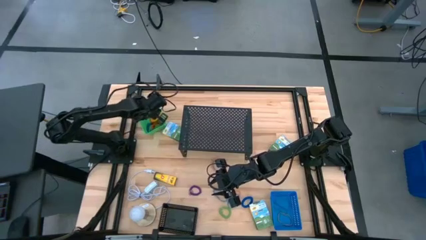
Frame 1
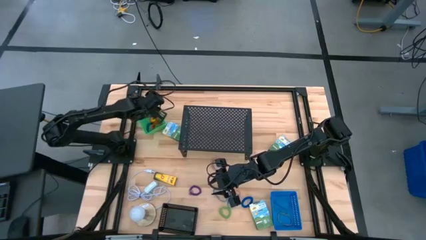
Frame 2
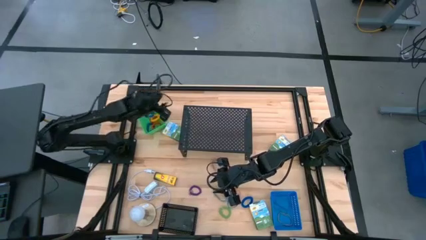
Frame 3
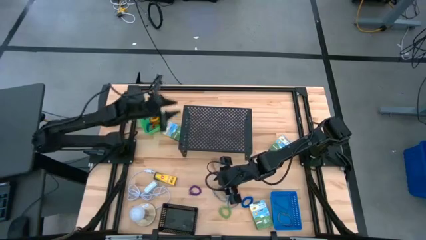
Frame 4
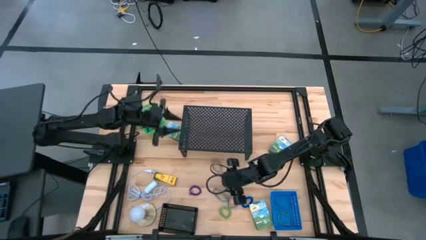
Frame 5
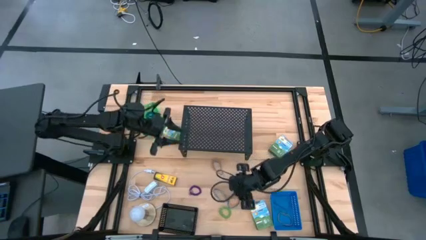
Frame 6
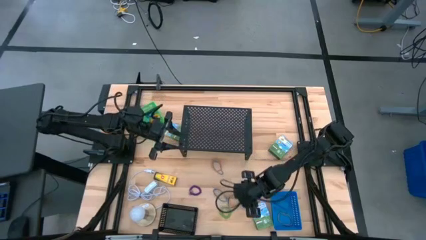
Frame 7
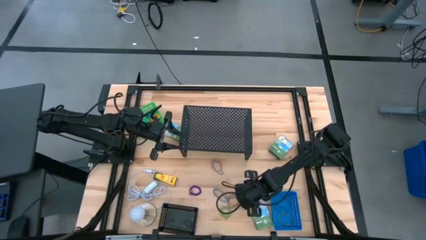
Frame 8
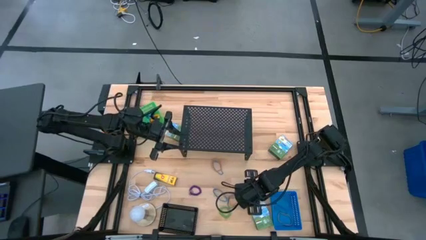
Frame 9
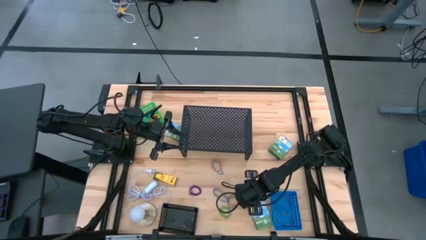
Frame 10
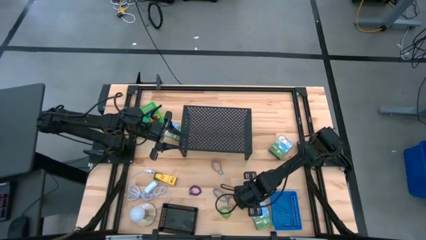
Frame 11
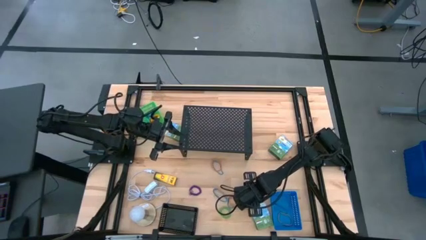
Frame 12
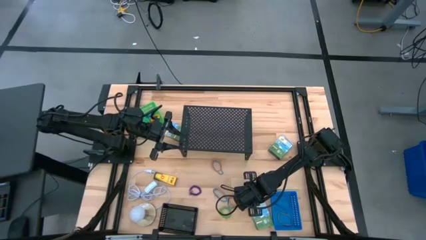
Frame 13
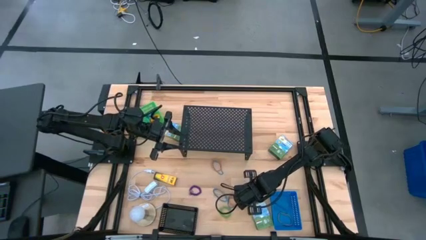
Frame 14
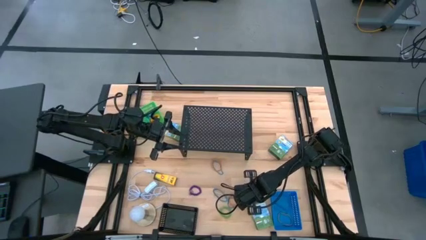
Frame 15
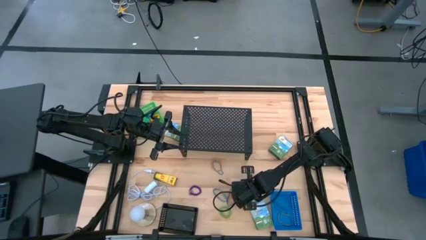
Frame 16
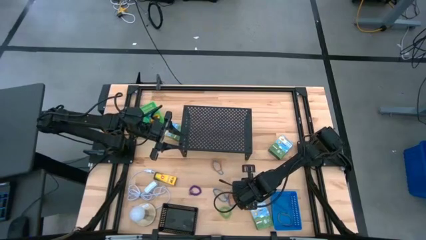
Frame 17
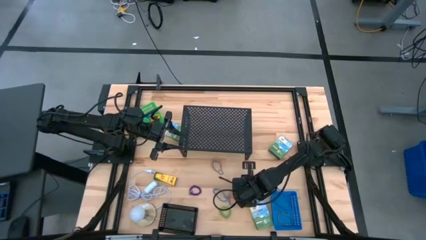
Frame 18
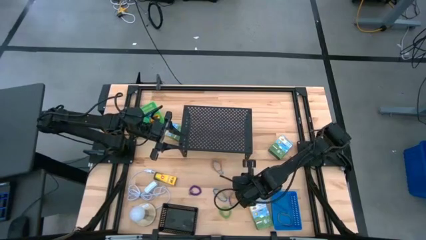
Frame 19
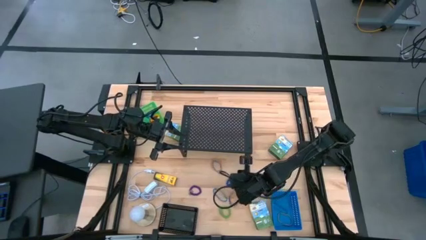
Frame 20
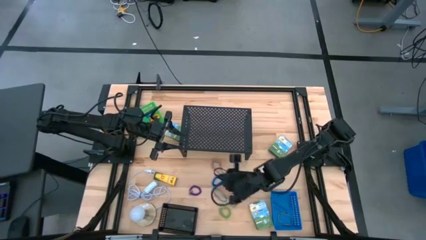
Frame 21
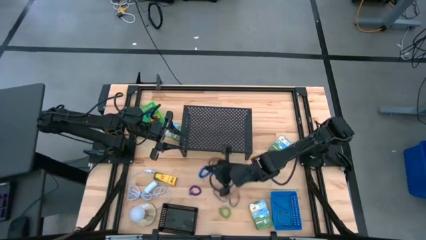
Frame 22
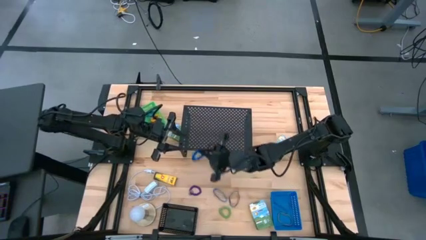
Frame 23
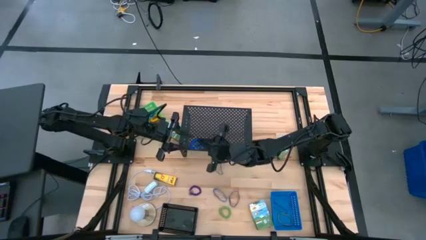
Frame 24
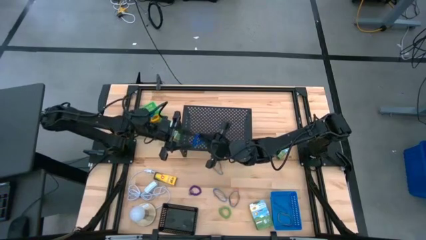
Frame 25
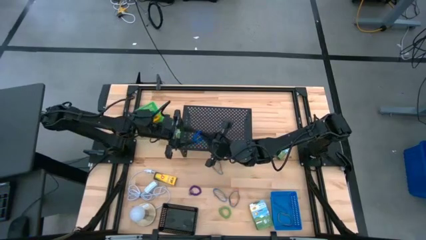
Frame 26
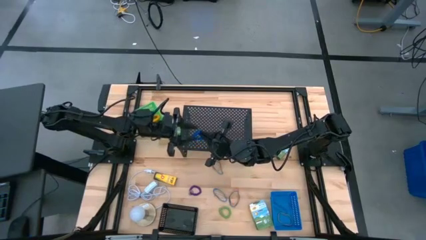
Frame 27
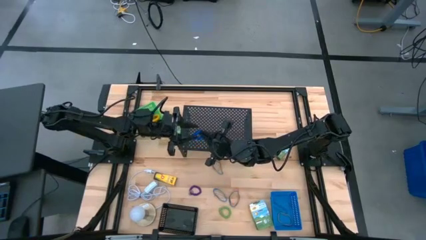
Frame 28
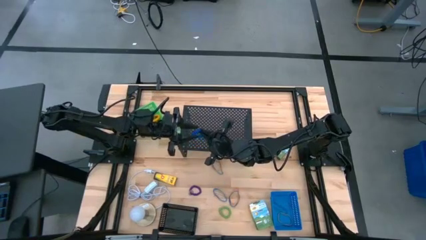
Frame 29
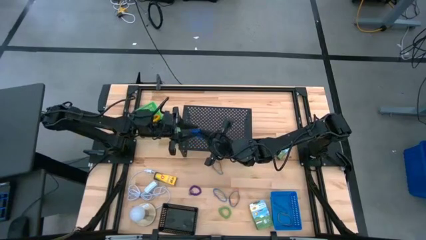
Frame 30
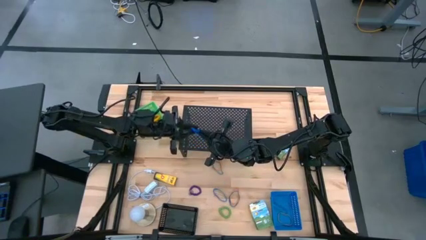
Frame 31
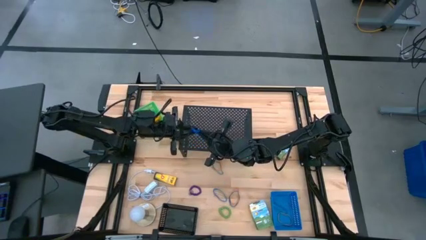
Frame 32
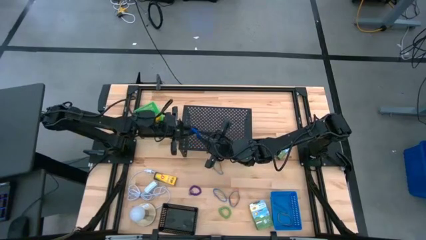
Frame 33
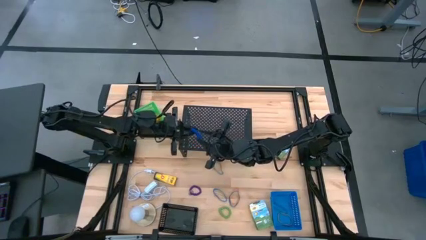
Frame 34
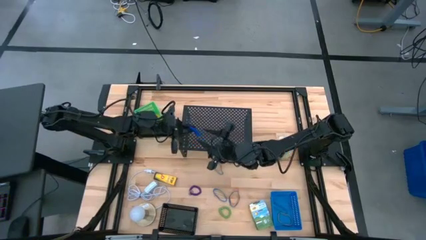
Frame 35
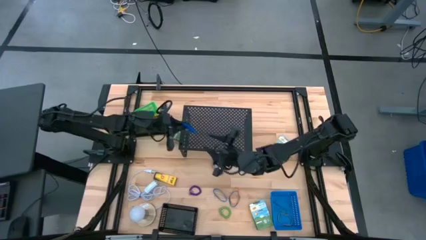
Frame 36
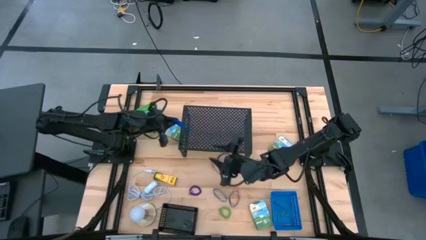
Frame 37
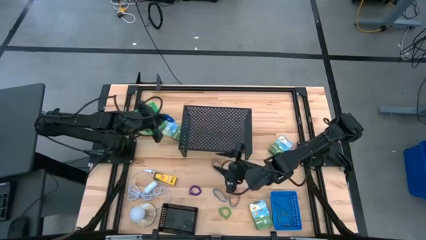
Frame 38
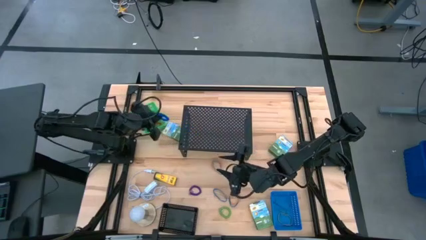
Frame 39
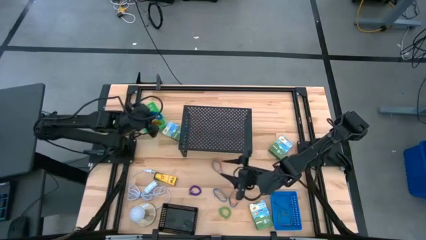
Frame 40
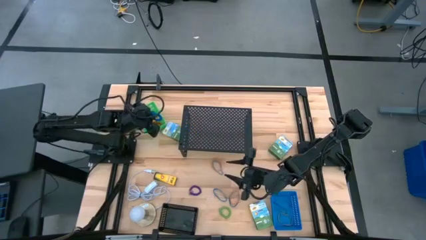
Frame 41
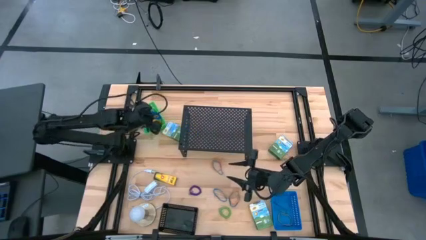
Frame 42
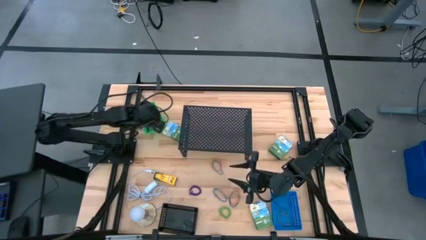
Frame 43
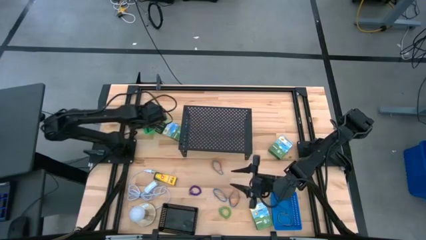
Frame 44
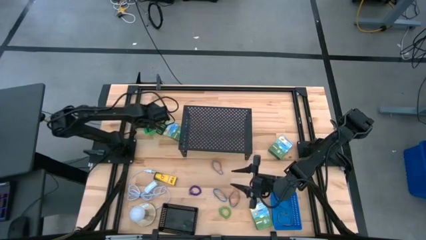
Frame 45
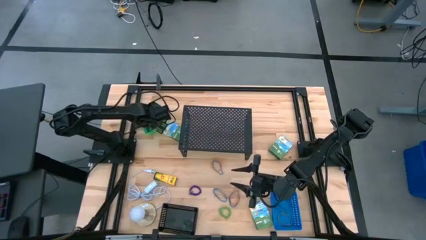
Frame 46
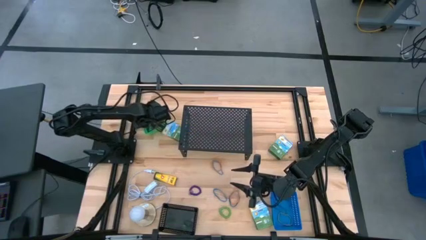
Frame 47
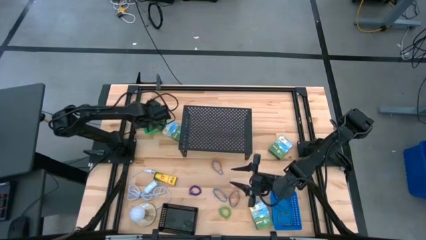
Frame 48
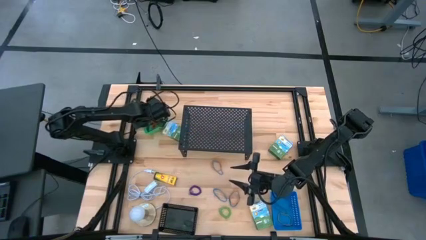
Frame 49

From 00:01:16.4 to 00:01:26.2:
Task: Pick & Place Office Desk Supplies
Put the blue spring keychain into the green bin

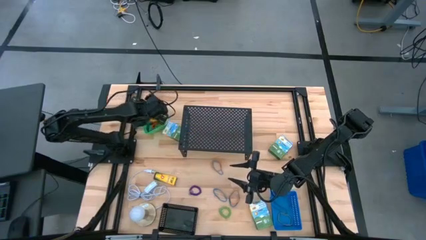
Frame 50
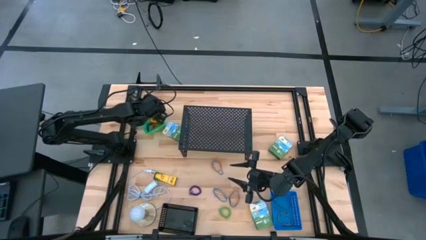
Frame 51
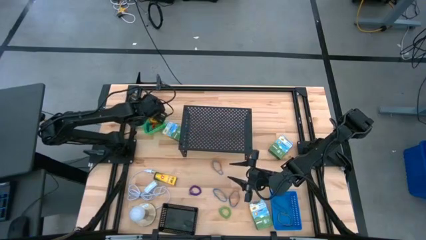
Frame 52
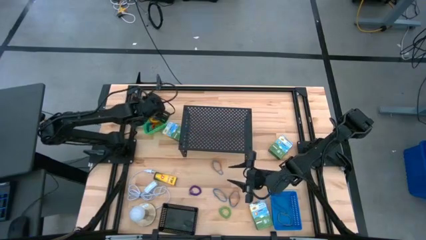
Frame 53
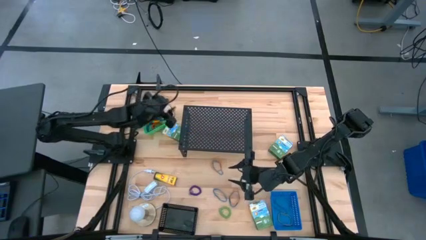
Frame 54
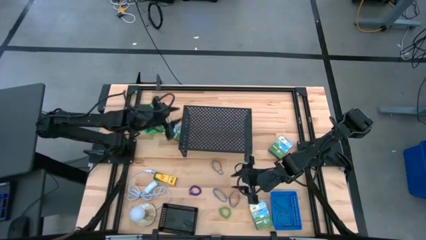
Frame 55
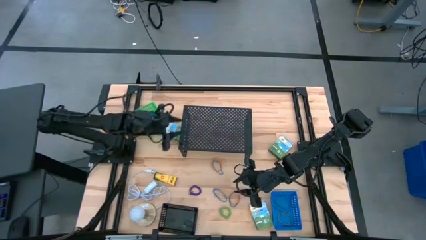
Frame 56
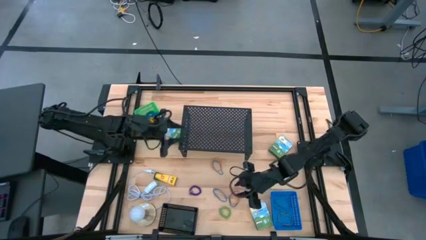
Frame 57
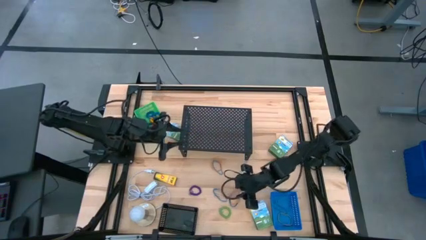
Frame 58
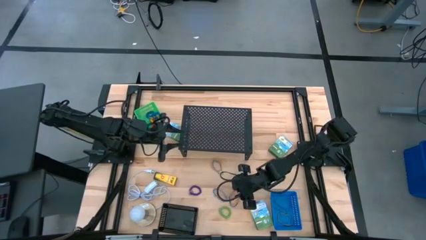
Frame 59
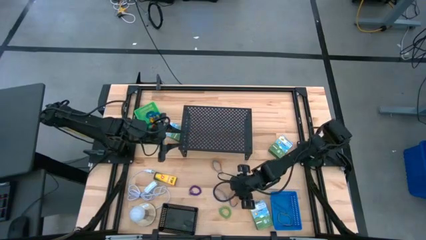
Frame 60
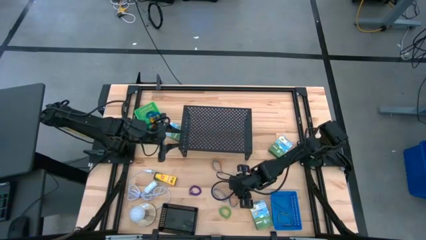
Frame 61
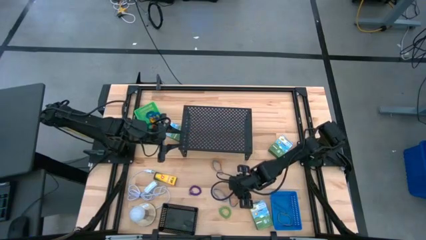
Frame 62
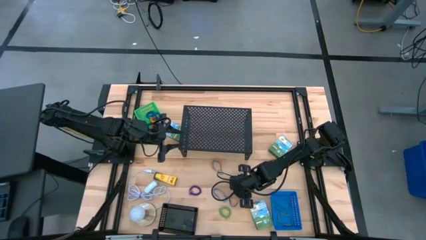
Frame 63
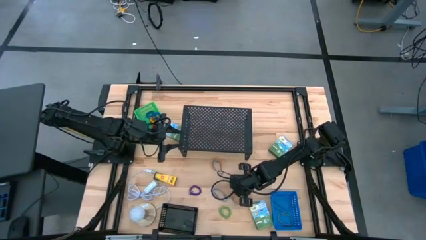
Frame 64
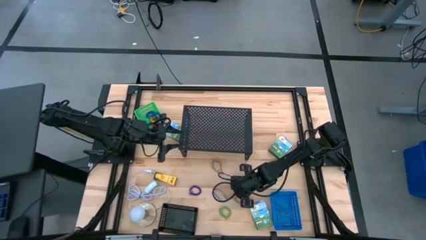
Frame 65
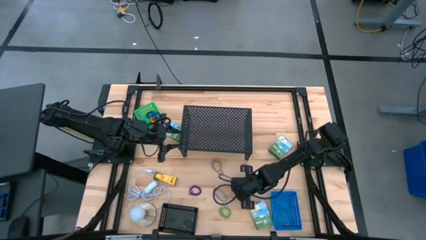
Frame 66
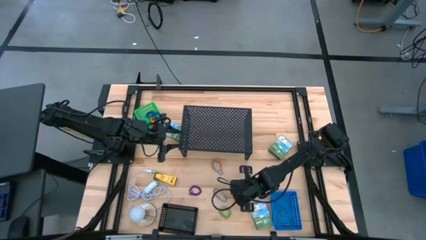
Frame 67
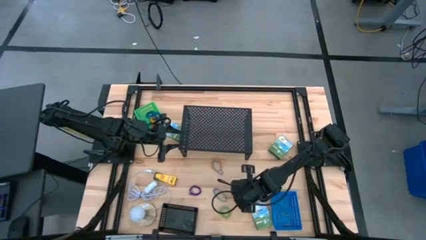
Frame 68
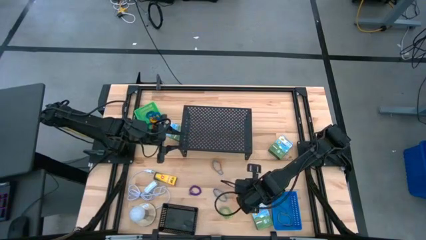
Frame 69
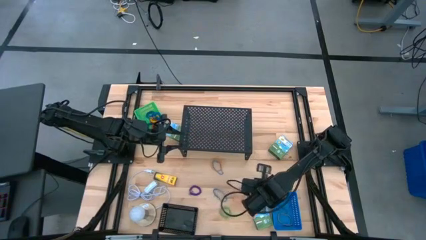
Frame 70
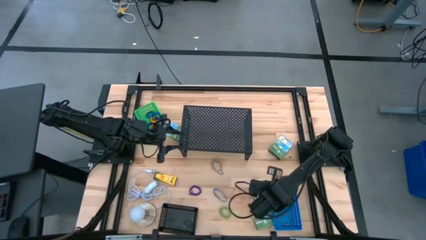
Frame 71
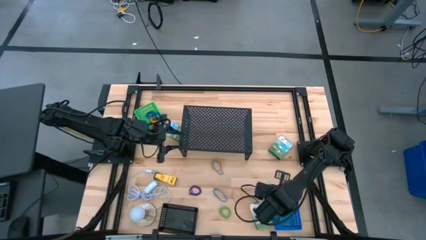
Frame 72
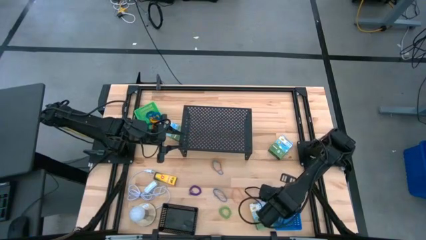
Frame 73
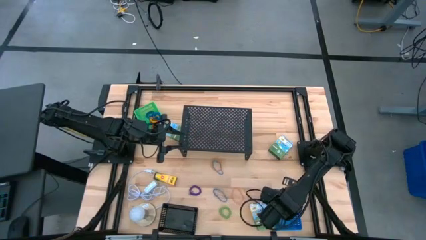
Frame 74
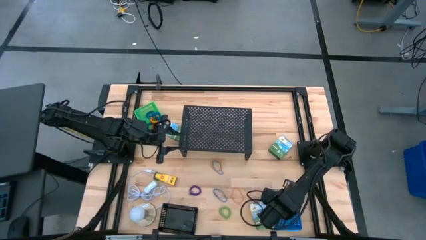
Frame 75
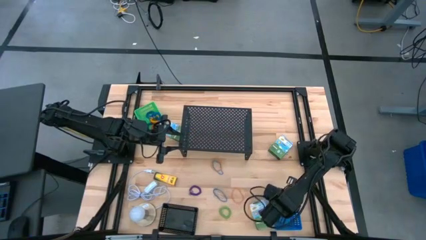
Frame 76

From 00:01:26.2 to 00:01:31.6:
Put the blue rubber band into the blue bin

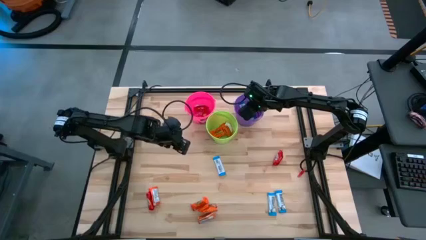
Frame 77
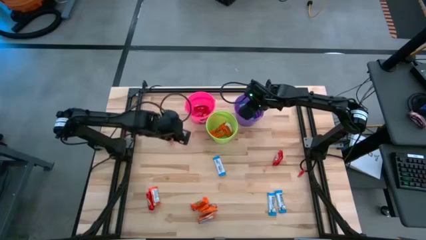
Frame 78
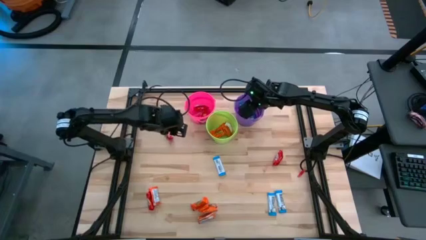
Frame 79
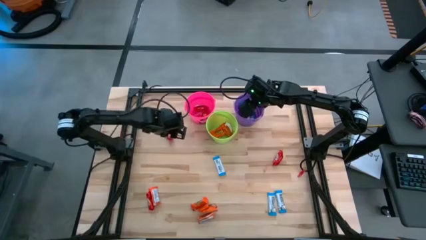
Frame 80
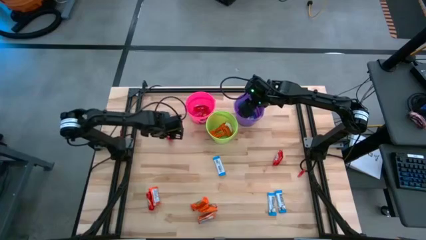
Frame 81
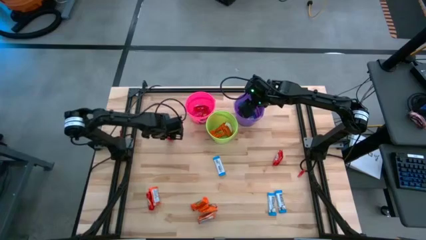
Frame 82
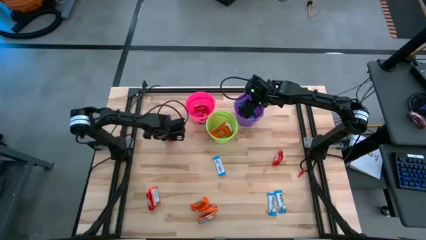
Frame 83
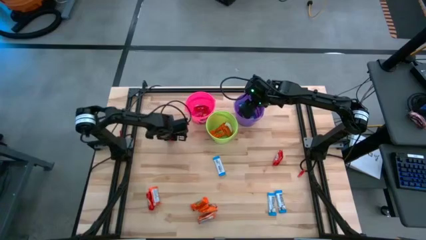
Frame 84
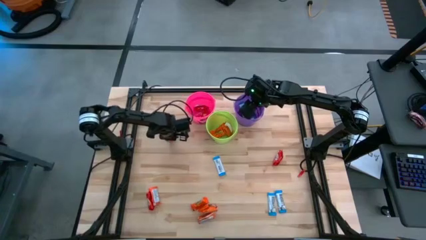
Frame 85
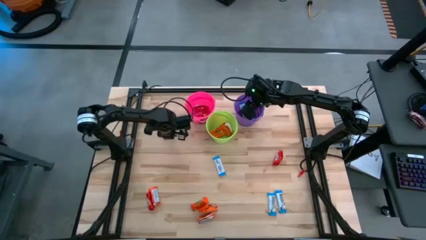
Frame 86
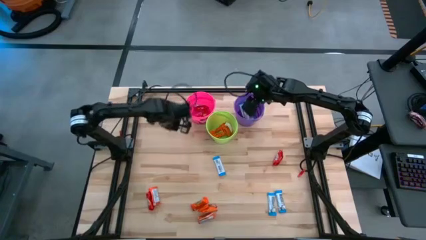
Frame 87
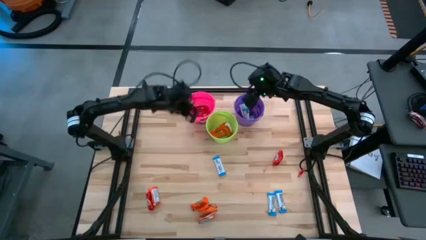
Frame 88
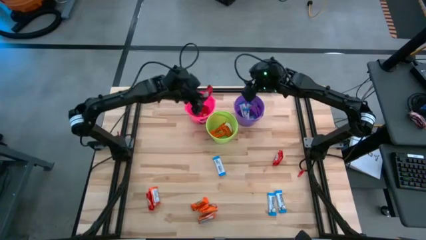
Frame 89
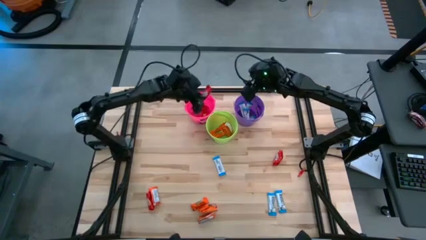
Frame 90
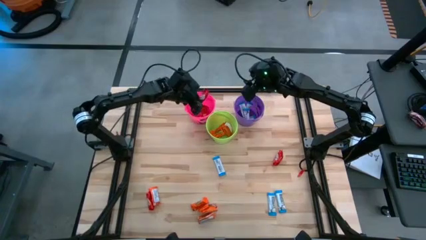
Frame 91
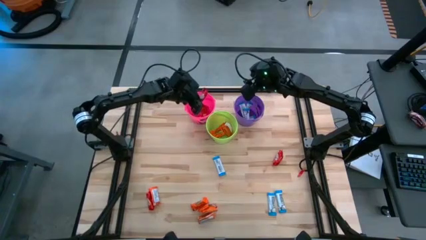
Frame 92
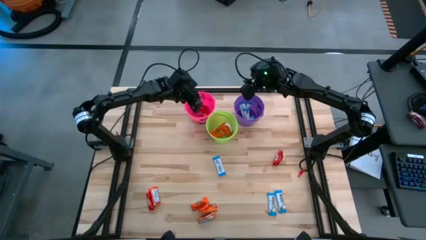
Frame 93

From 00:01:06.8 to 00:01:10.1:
Task: Sort candy
Put the red candy into the pink bin
